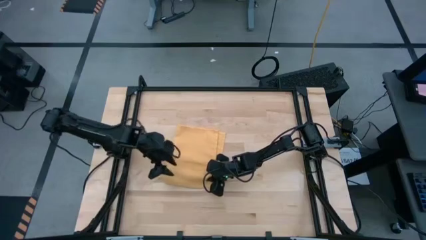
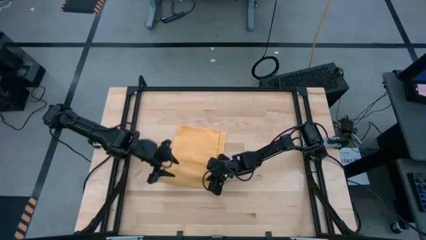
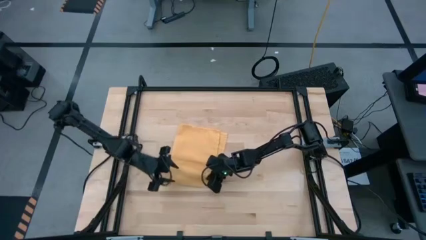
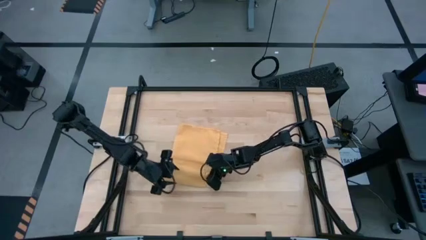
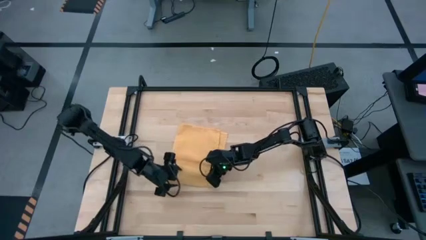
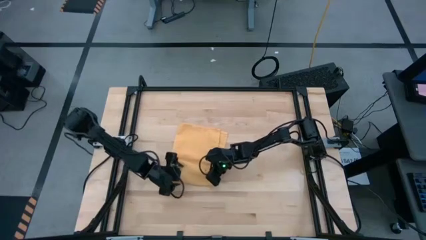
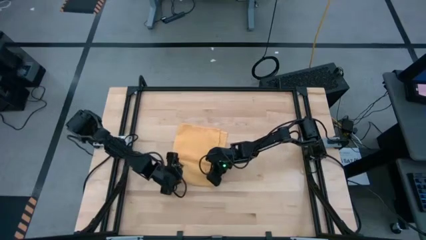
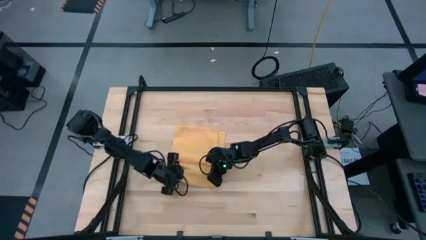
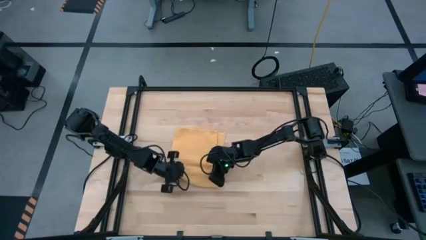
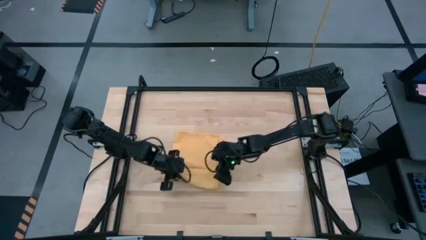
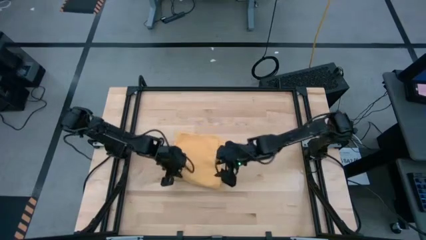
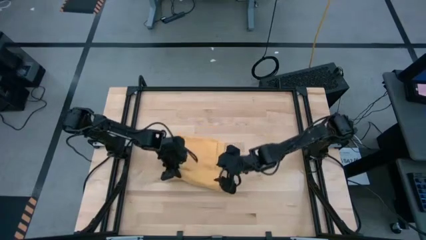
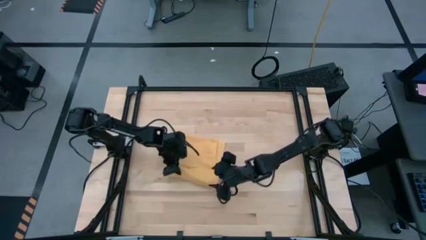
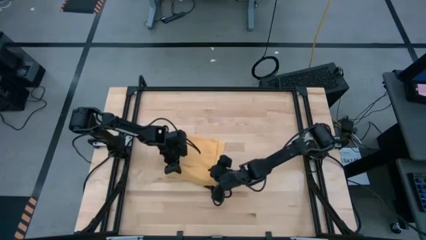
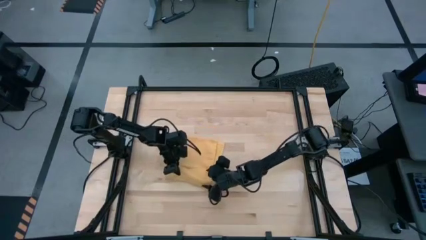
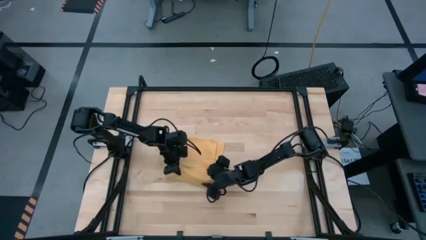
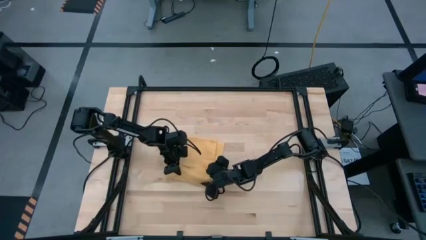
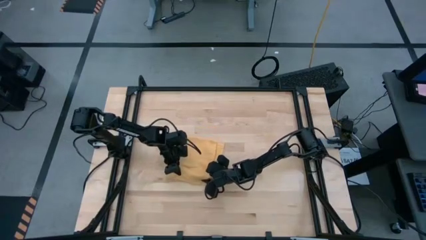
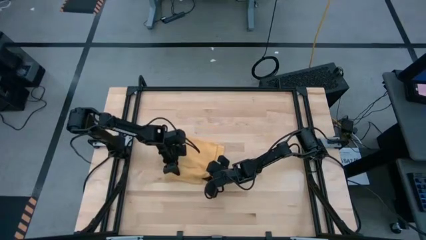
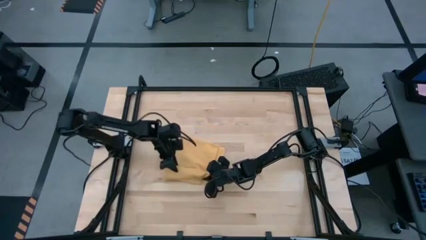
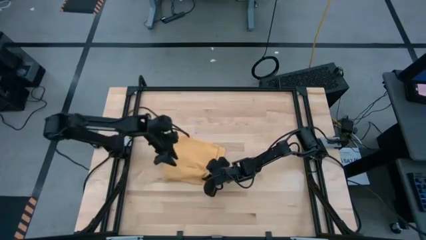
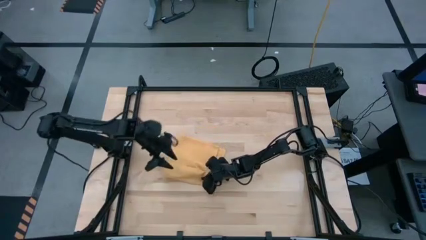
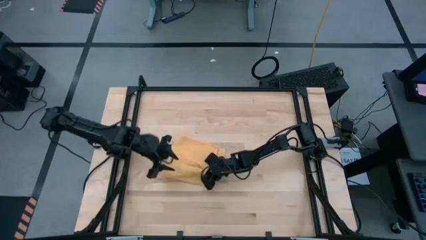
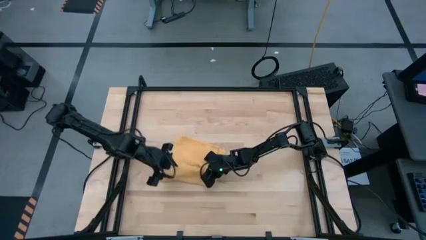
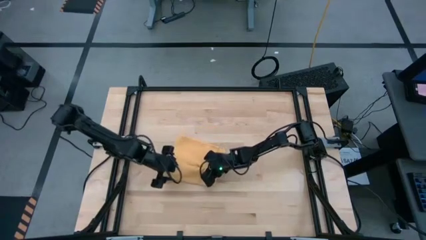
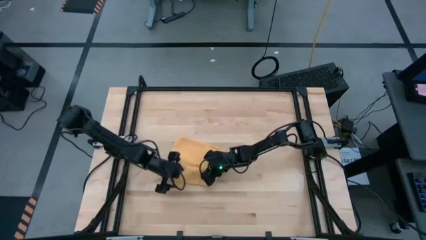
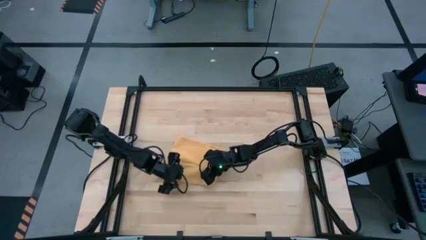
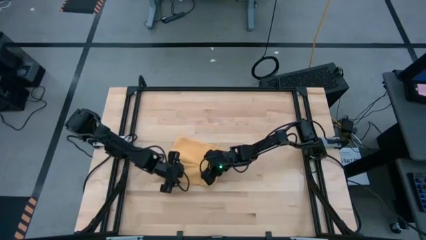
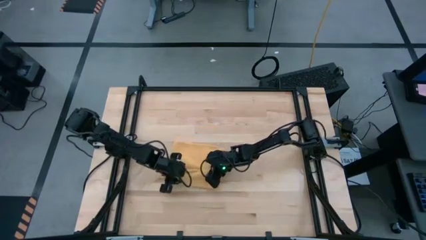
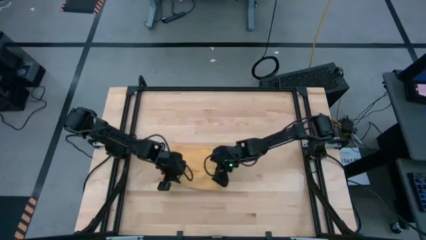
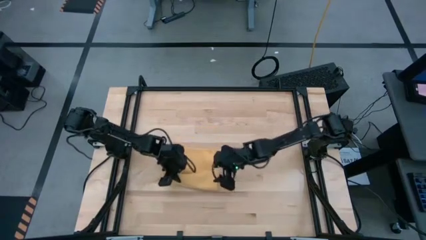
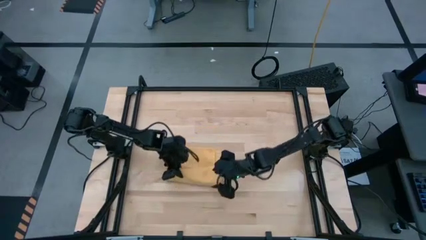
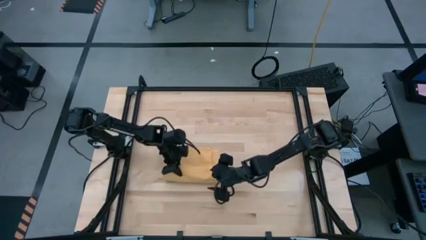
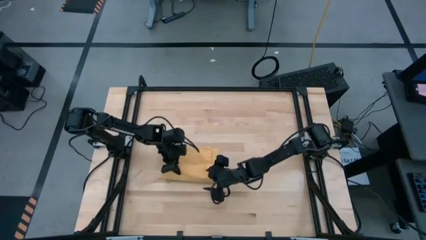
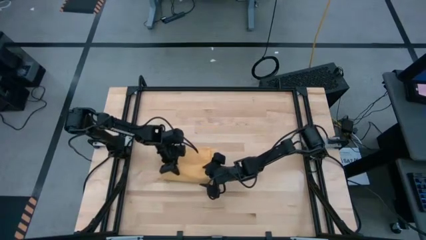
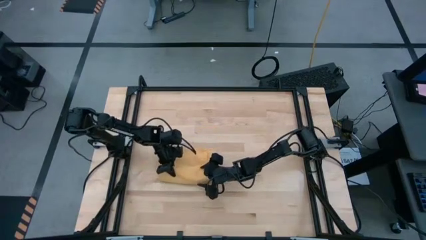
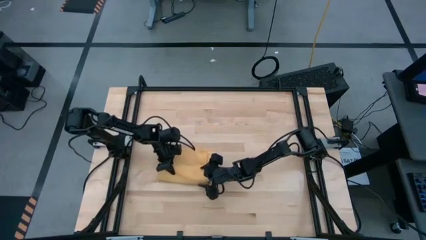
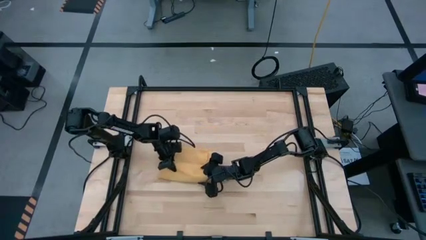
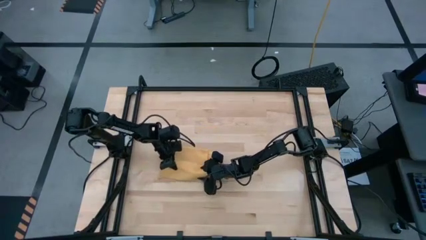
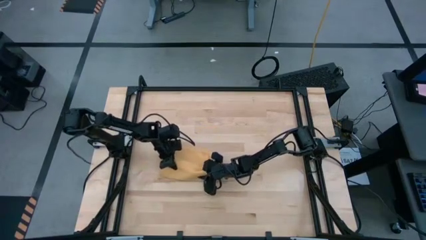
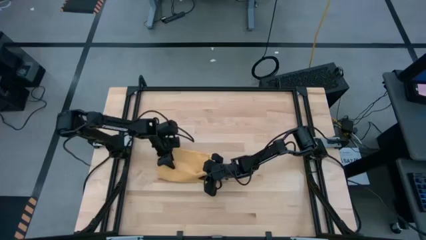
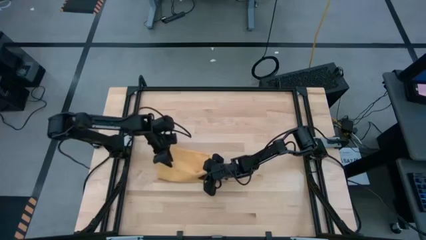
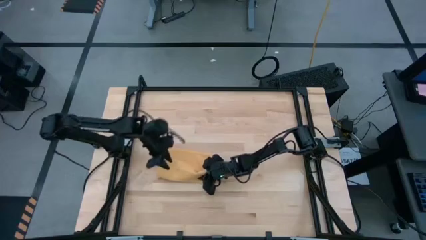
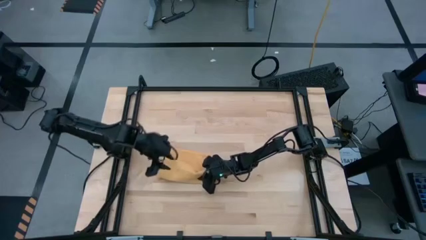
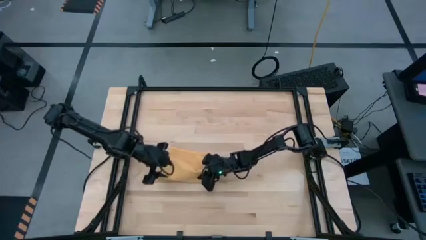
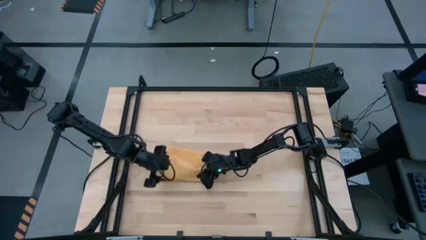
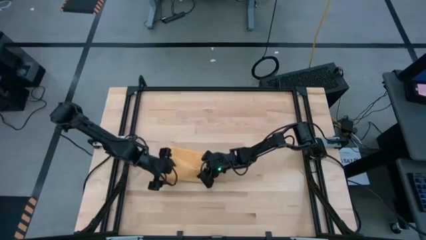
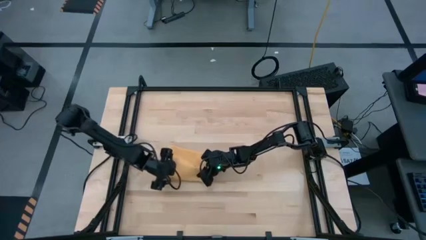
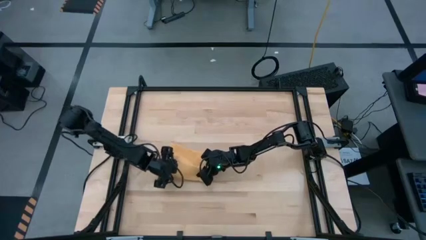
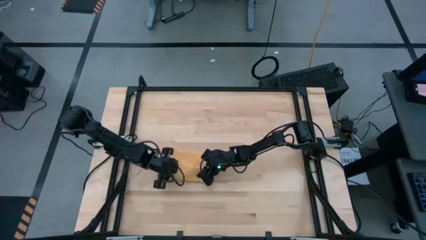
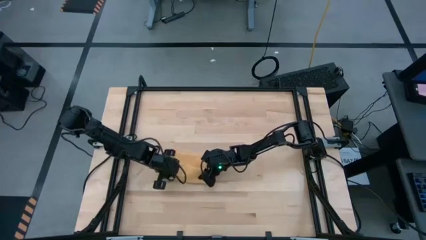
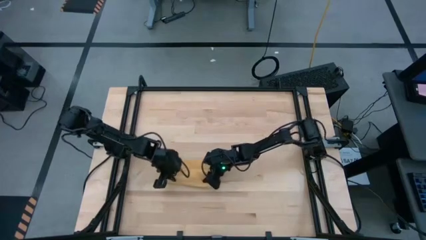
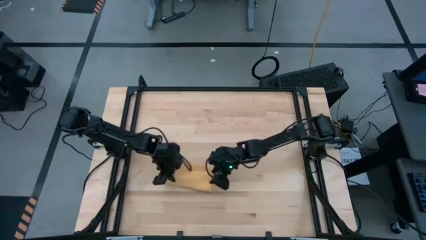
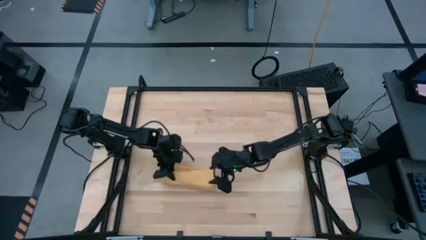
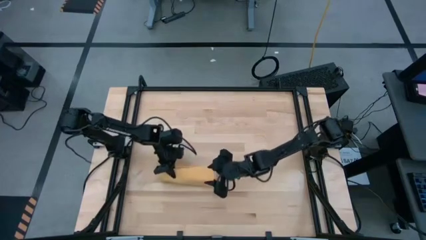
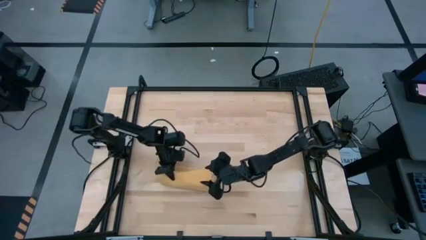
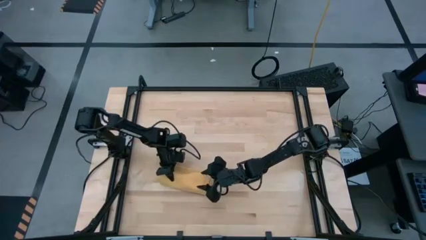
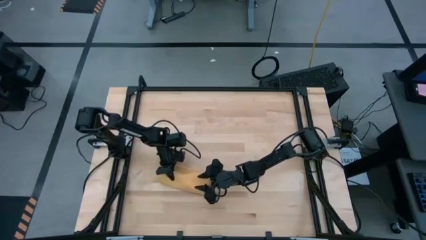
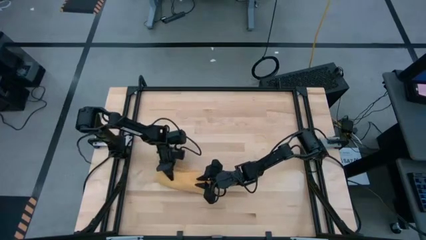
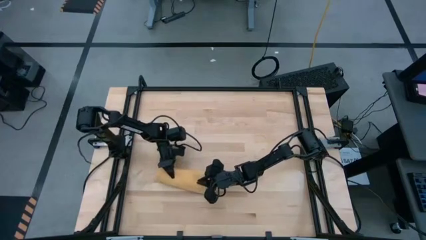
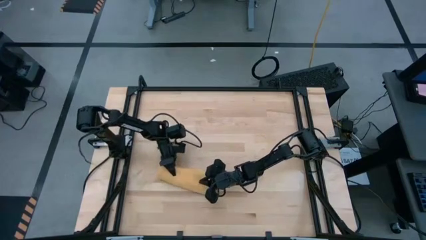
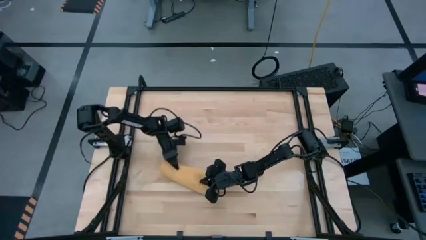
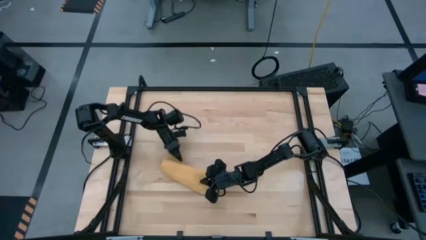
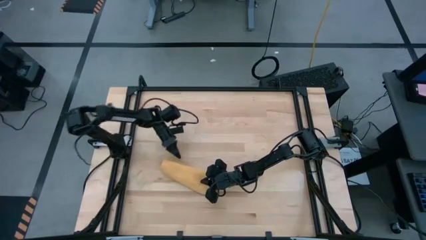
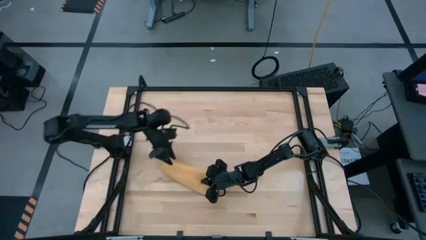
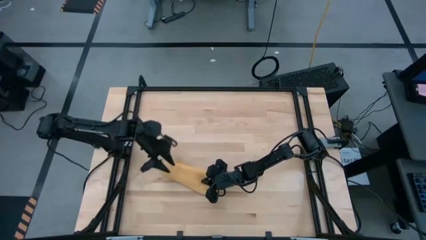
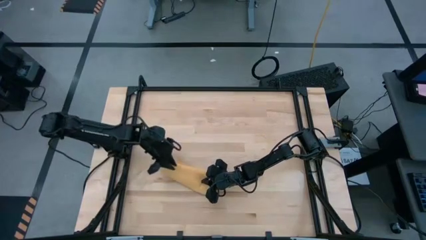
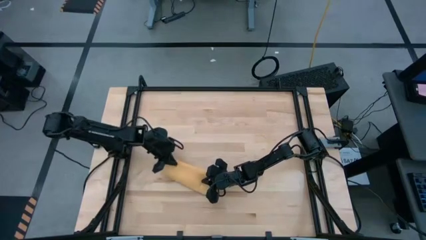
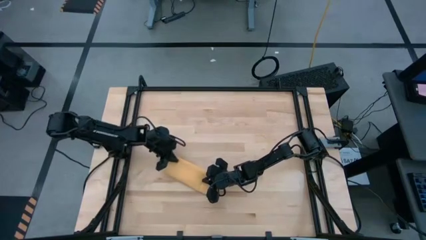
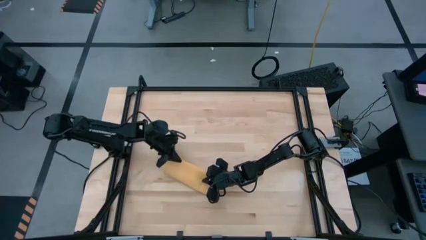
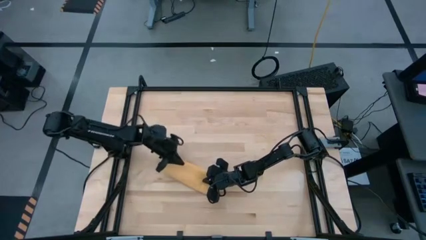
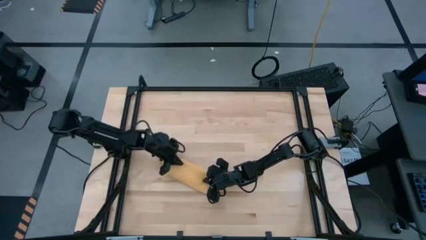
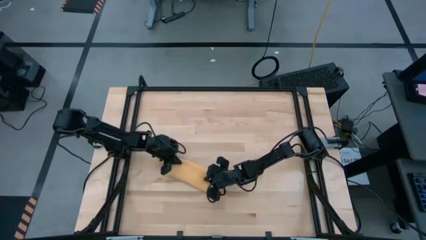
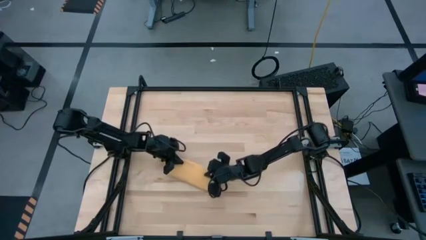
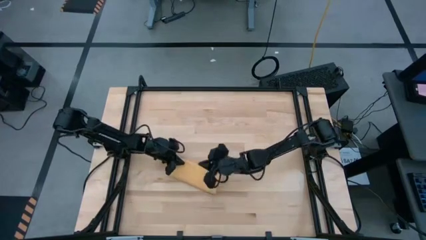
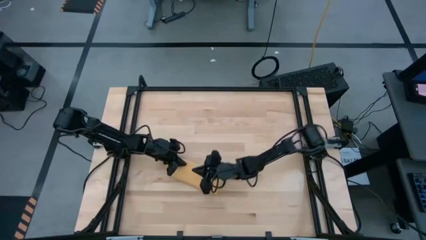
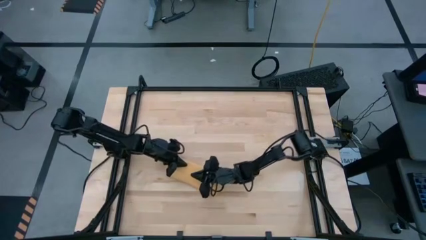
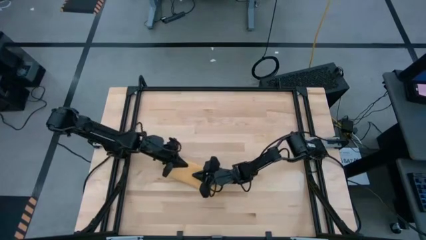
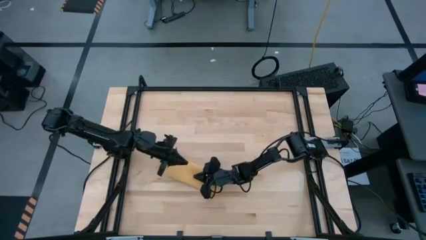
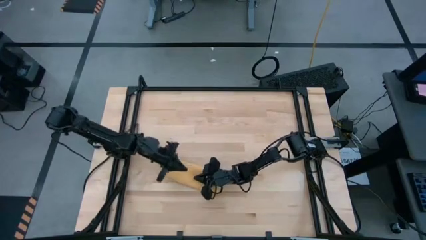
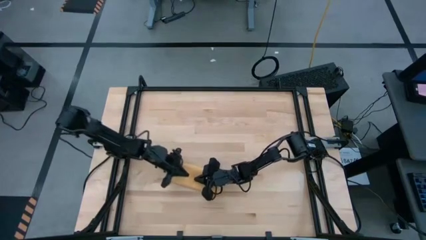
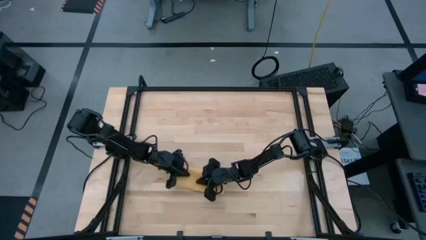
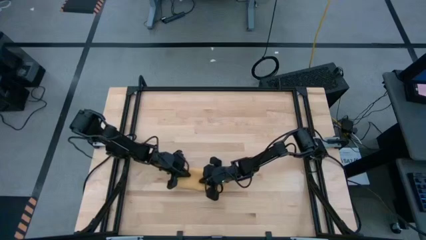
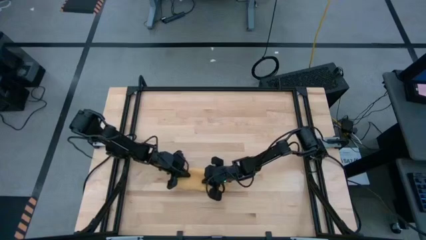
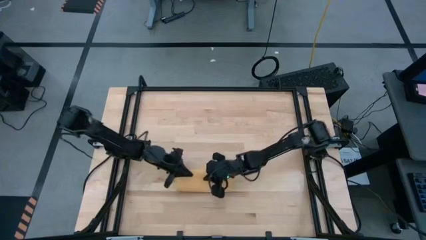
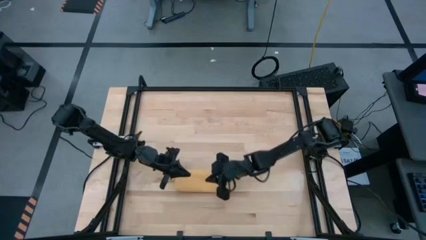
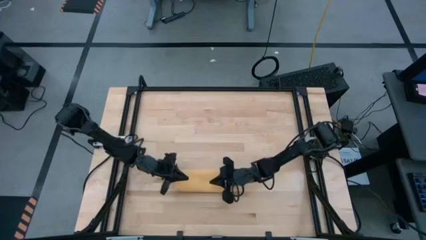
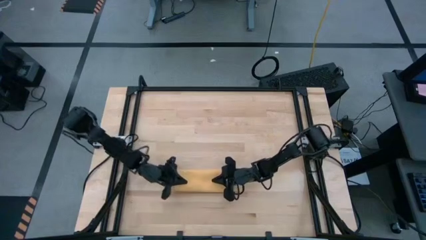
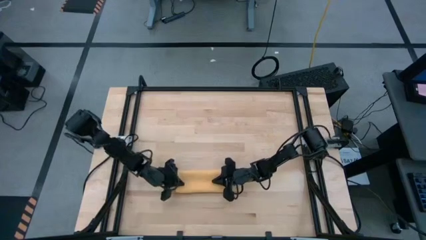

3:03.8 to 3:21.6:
Task: Roll towel
Roll the yellow towel
